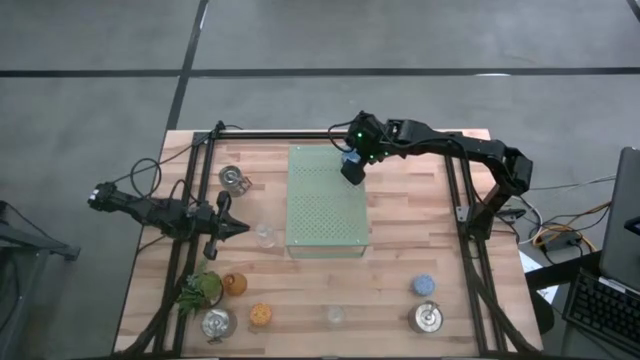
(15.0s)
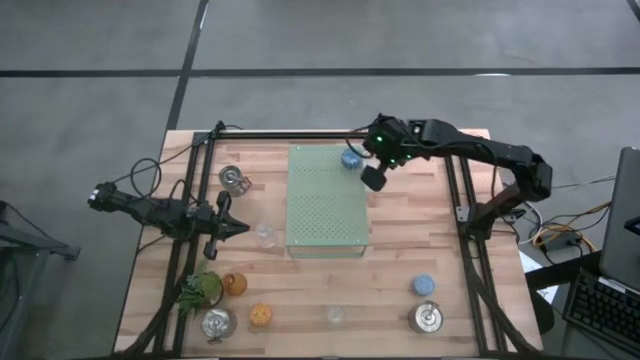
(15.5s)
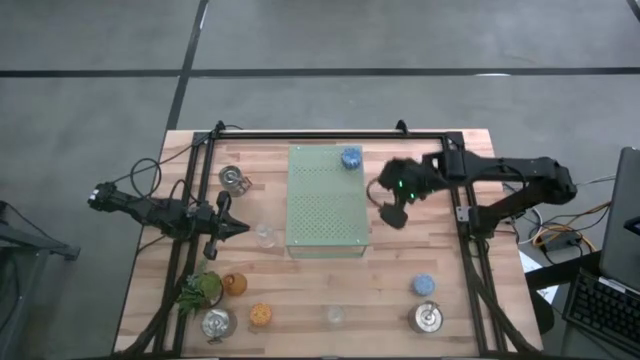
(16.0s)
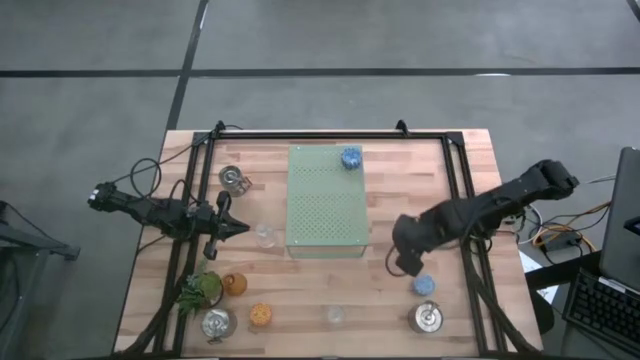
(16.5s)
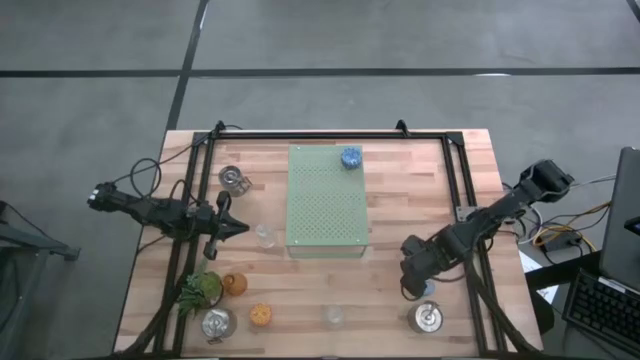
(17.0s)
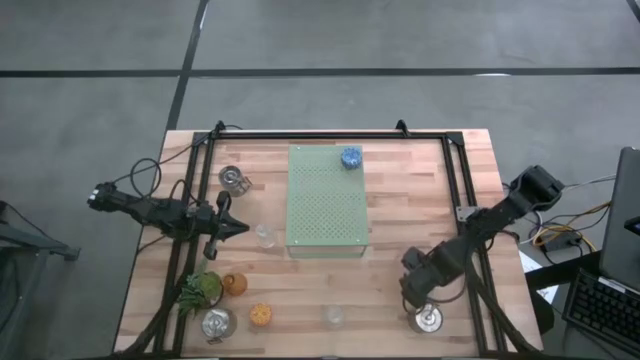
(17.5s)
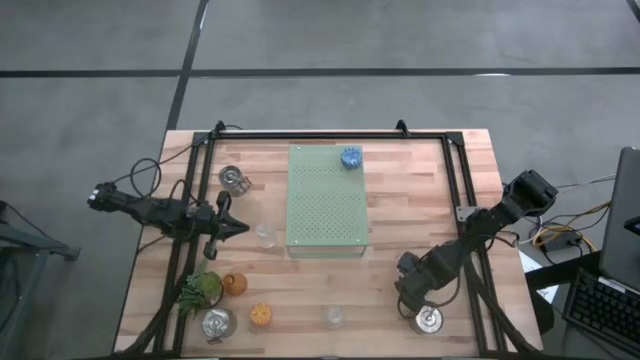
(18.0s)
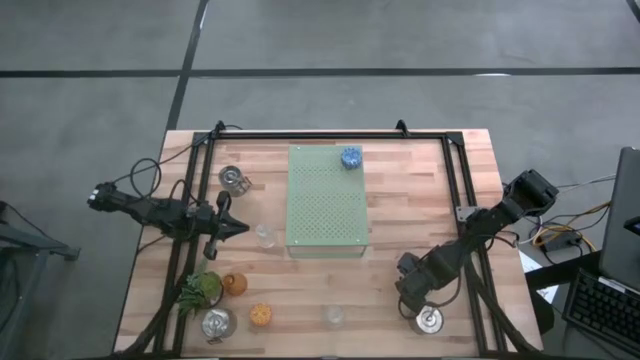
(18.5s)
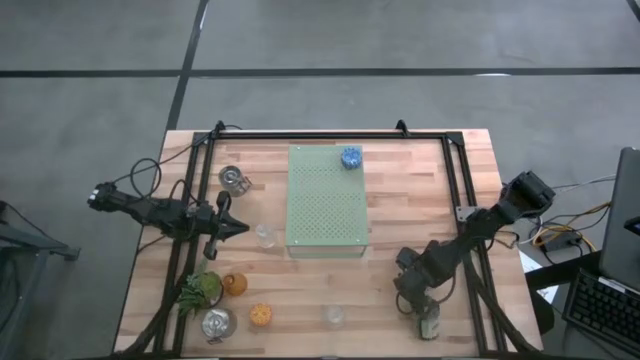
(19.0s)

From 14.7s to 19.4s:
Task: Pick & Place candle stick holders
Put the light blue patterned scented candle on the shelf aligned with the other blue patterned scented candle

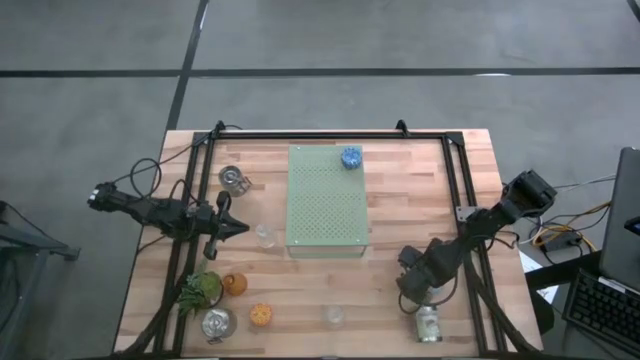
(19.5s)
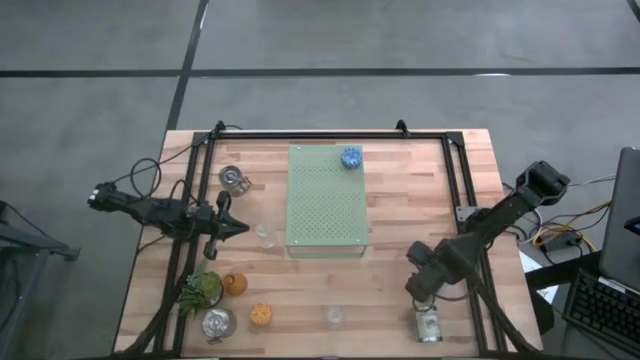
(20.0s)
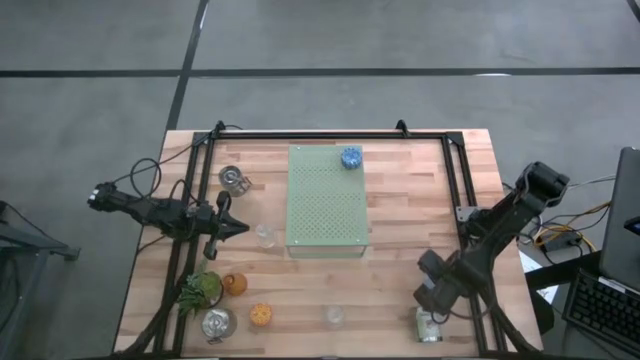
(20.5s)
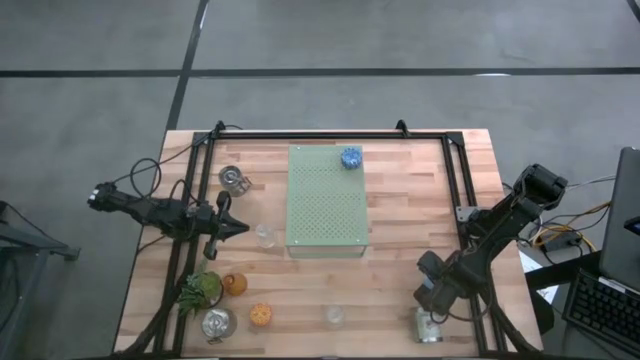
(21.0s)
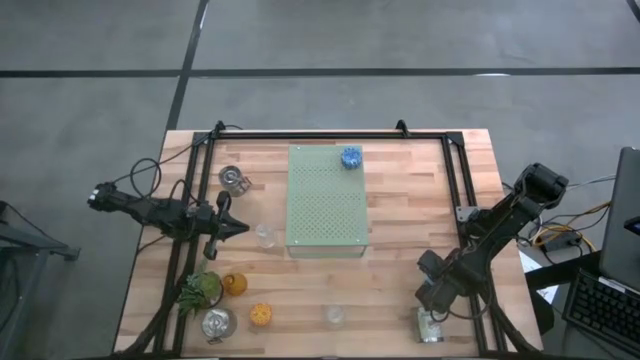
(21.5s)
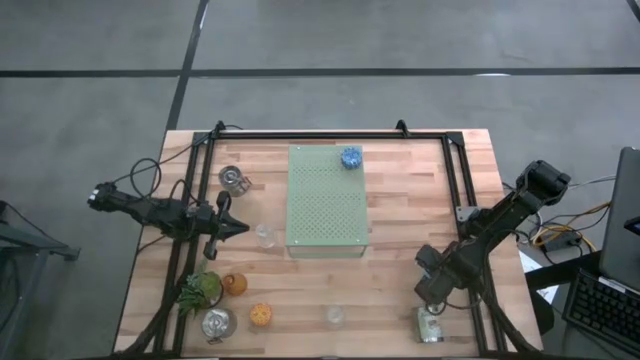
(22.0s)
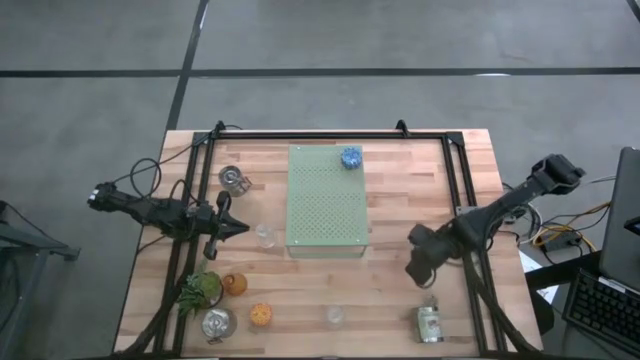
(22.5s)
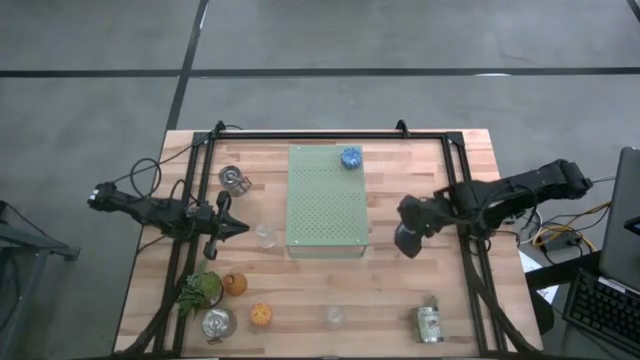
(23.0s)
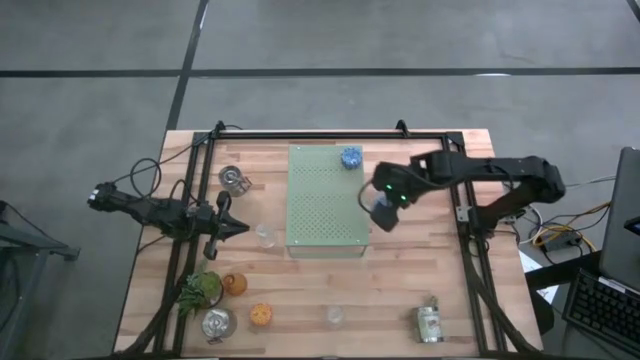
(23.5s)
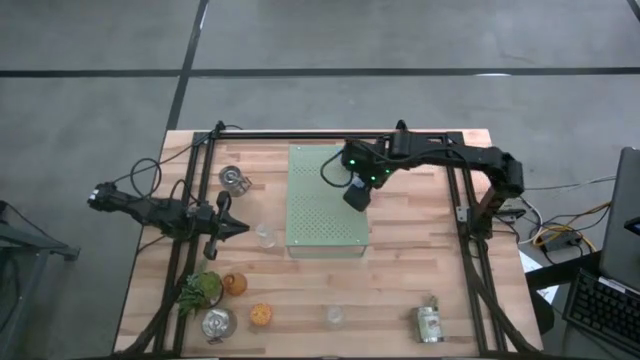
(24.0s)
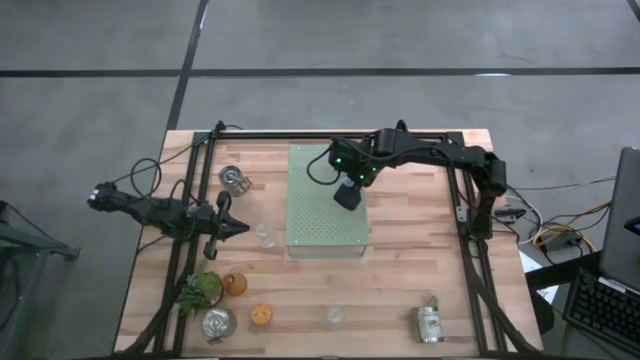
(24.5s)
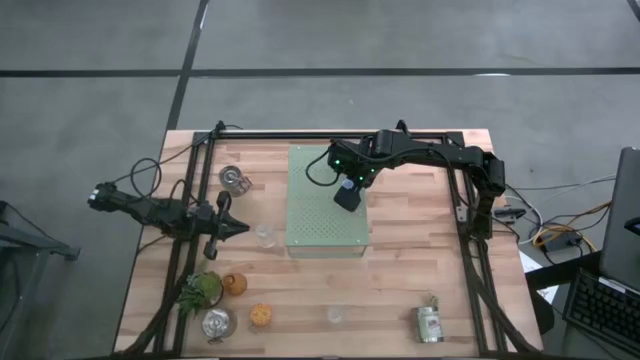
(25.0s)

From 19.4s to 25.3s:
Put the light blue patterned scented candle on the shelf aligned with the other blue patterned scented candle

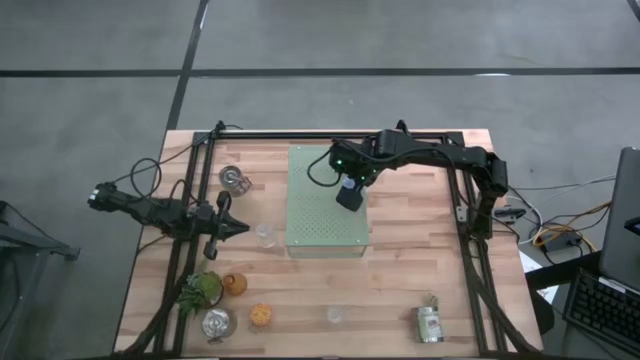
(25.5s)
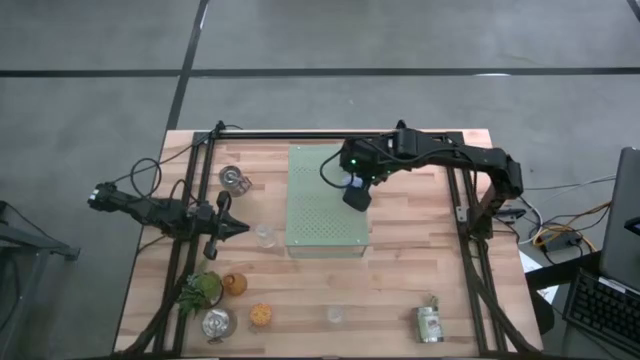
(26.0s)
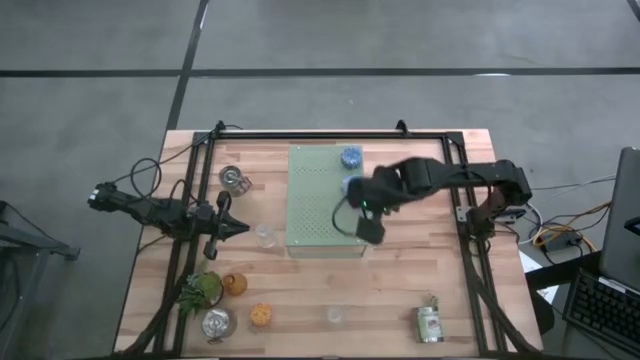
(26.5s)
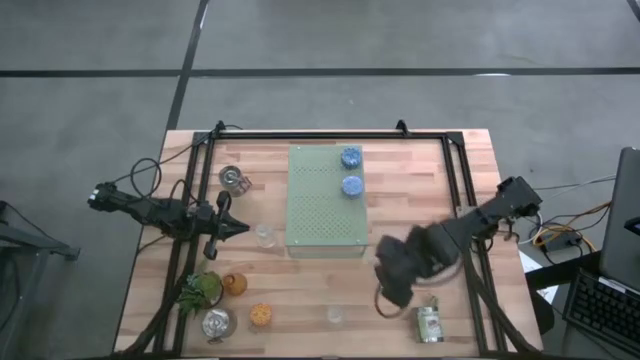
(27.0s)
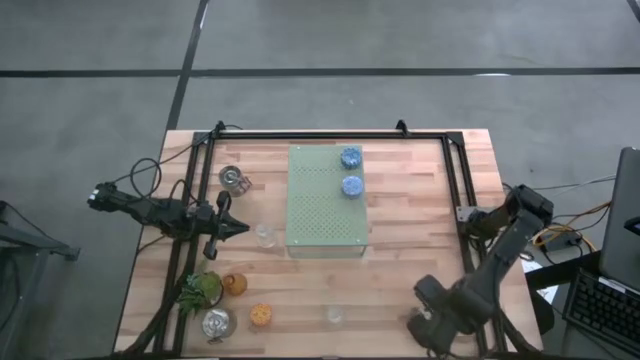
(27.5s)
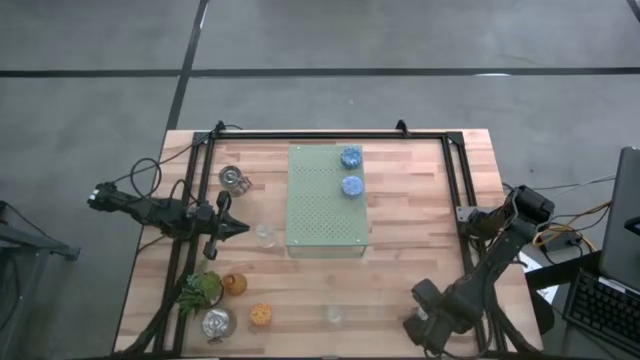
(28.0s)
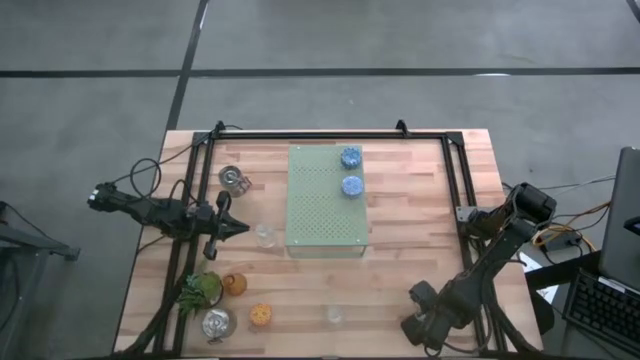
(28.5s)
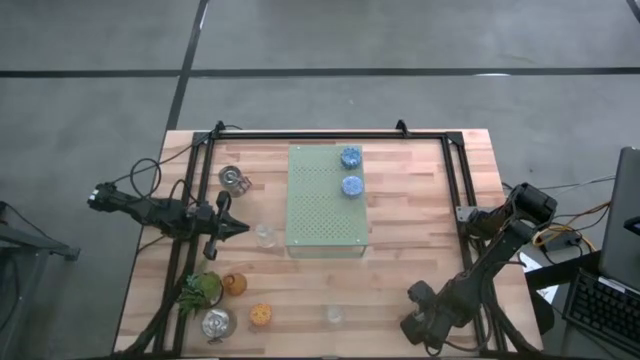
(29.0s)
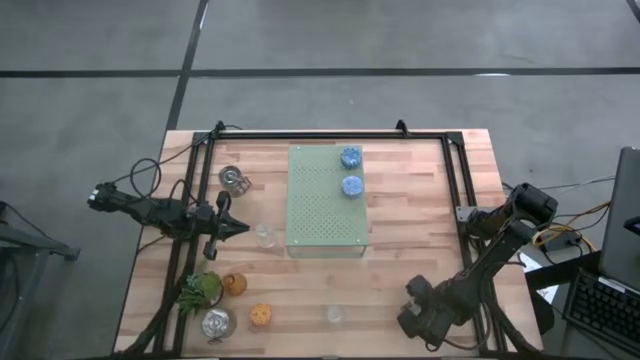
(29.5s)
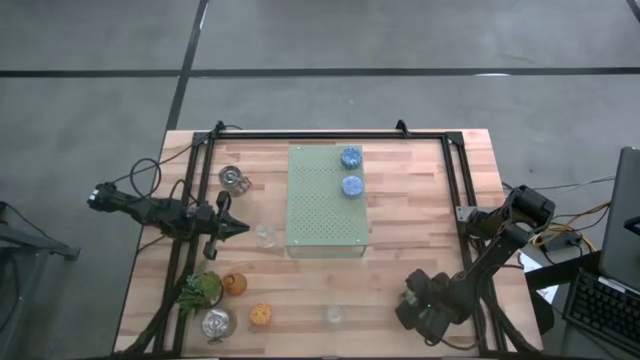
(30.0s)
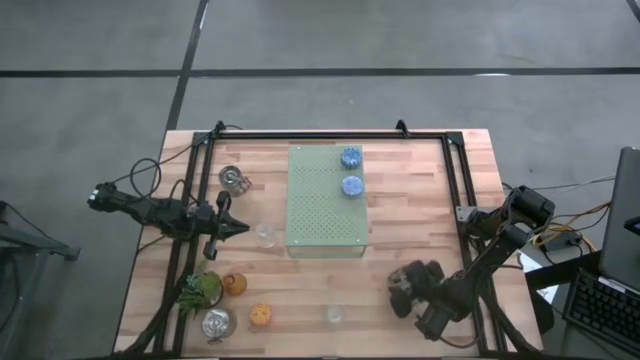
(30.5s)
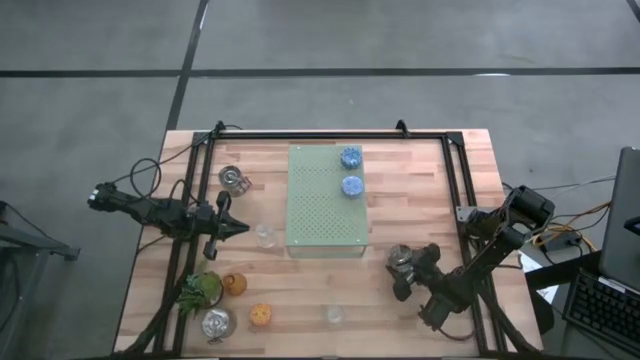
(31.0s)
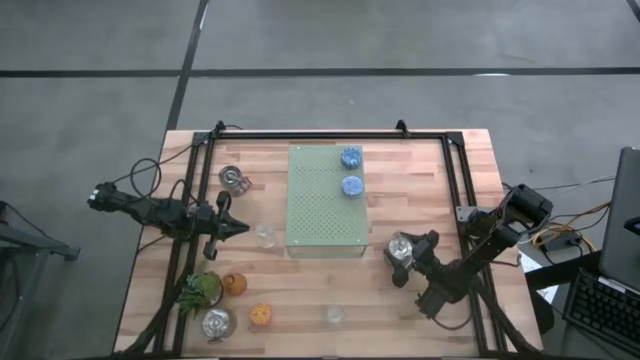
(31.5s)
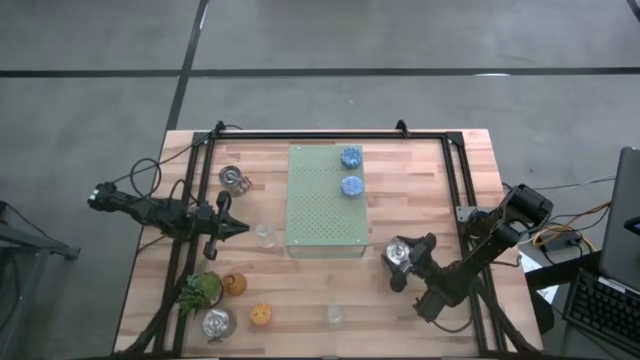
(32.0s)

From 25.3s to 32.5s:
Move the green scented candle to the middle right of the table

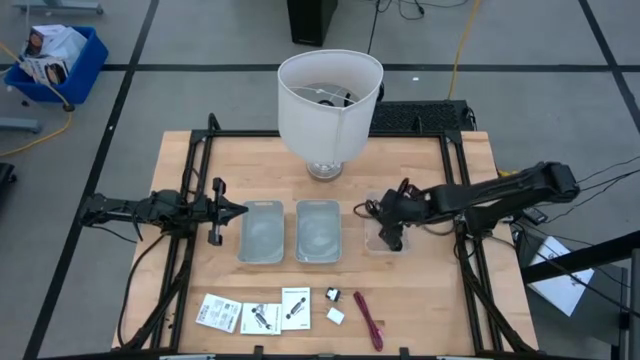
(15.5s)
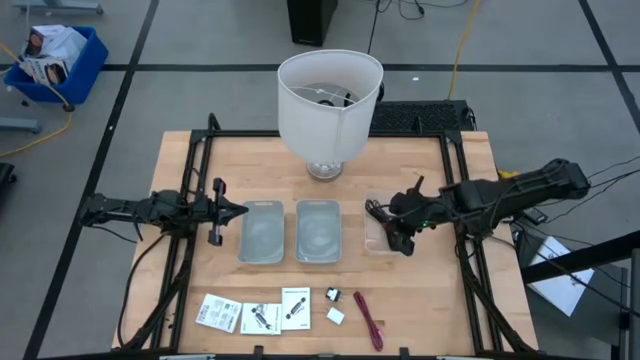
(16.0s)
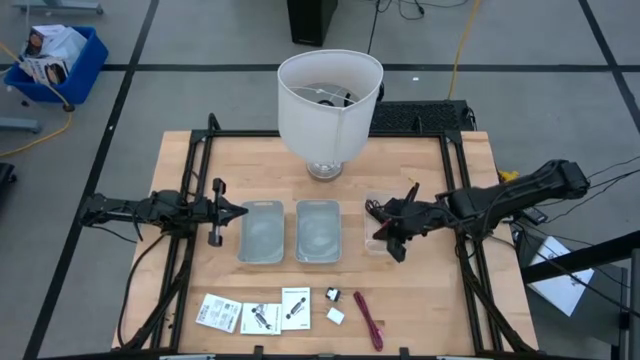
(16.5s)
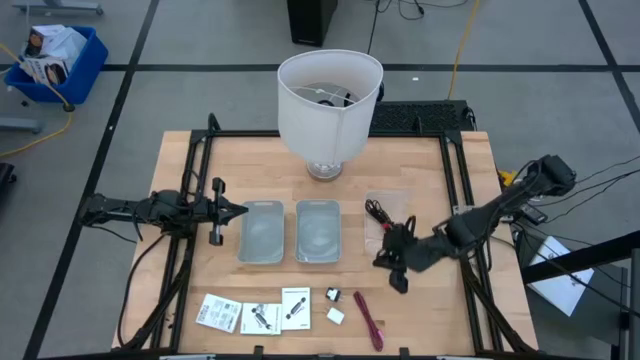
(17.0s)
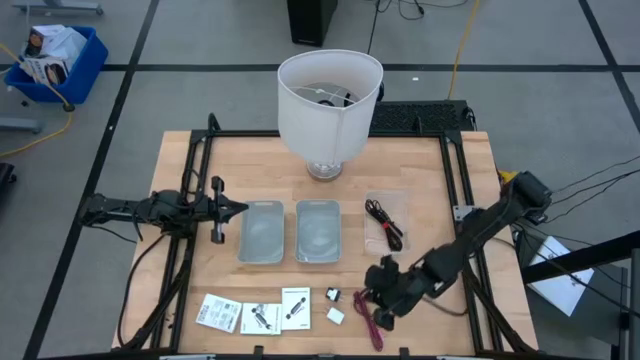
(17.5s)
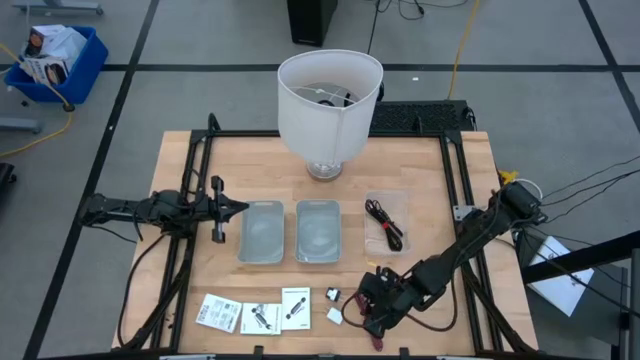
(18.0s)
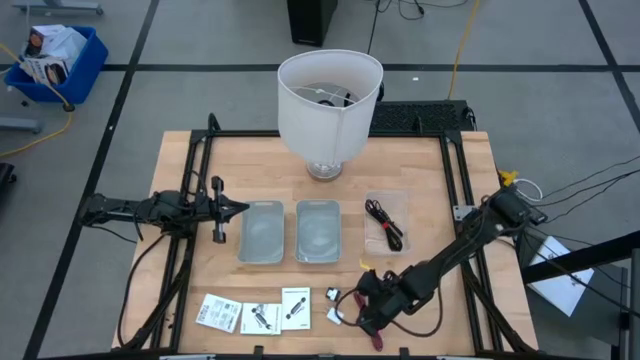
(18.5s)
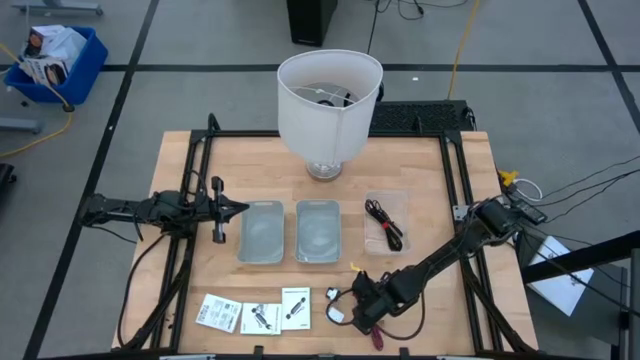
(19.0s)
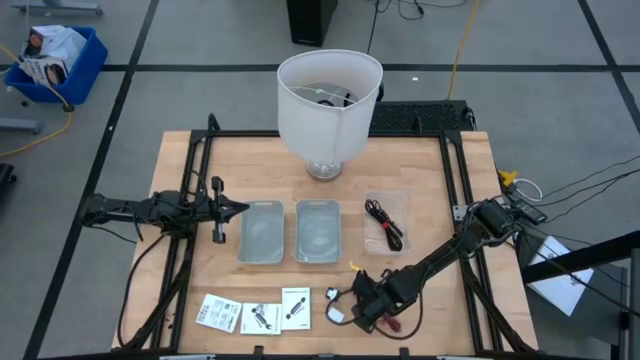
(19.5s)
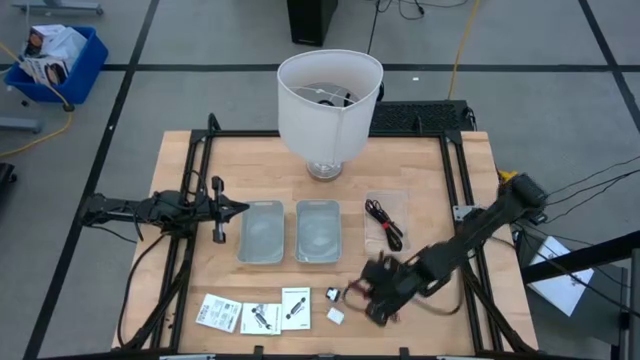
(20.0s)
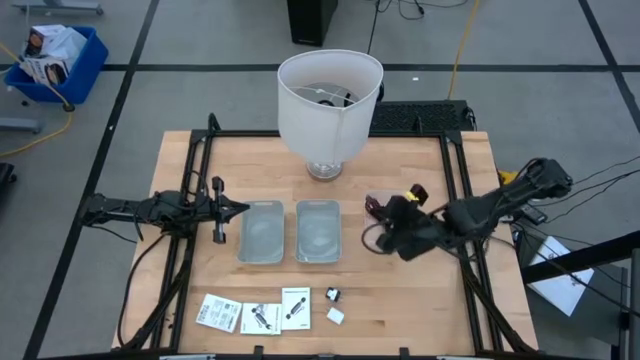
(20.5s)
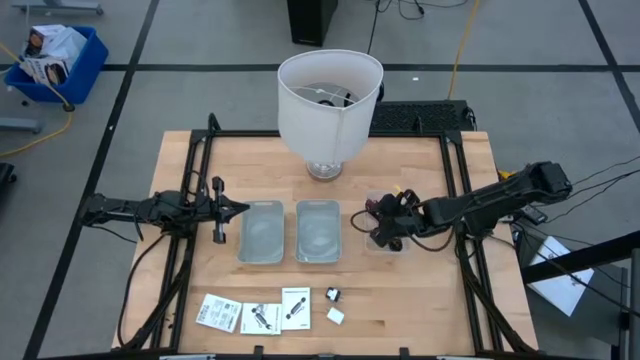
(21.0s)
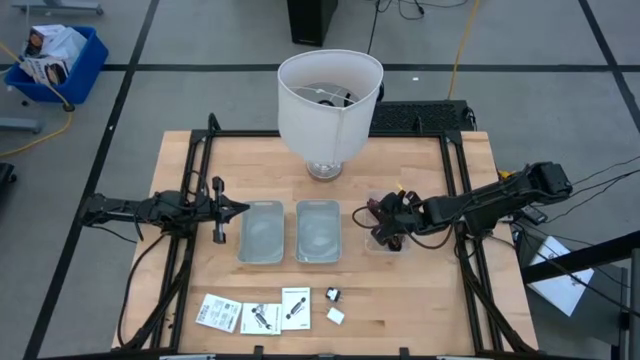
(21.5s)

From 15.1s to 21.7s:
Task: Pick and place items into bin
Put the pink and black charger cable into the transparent bin
